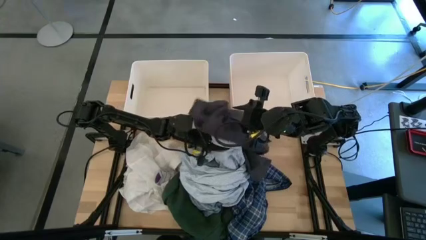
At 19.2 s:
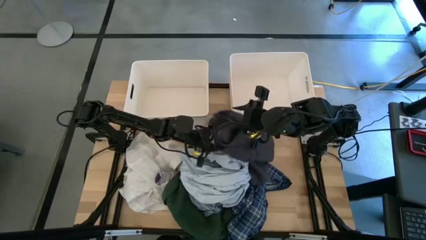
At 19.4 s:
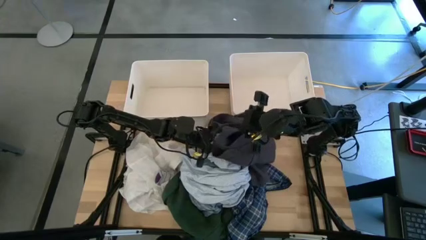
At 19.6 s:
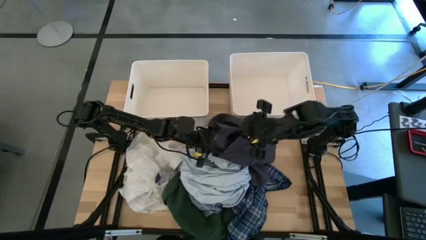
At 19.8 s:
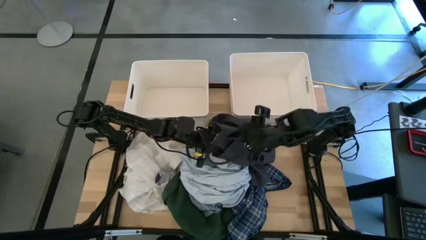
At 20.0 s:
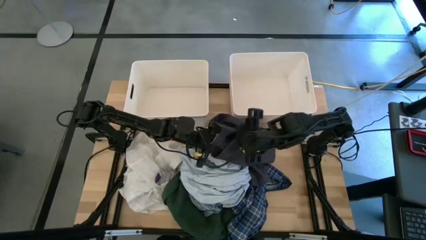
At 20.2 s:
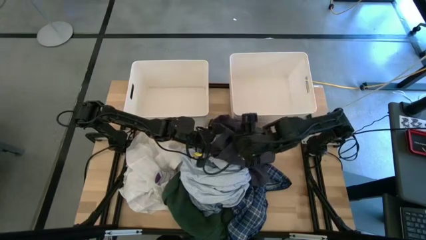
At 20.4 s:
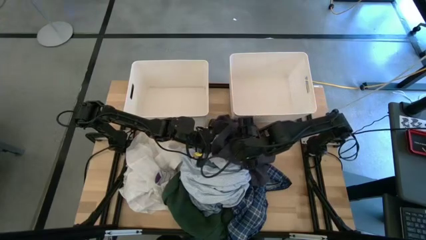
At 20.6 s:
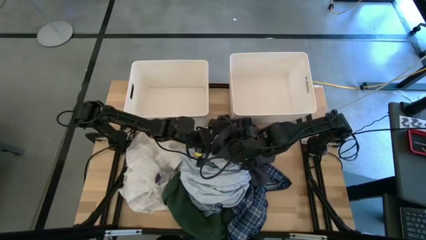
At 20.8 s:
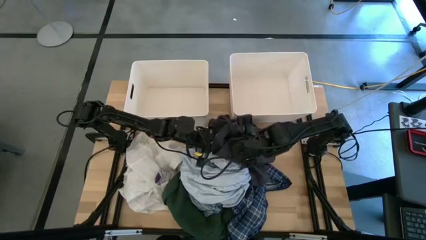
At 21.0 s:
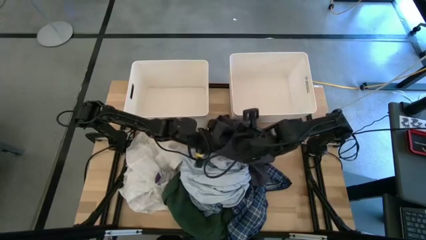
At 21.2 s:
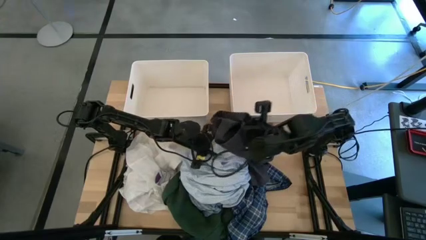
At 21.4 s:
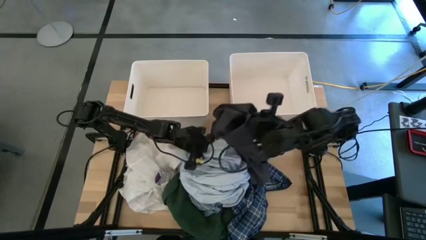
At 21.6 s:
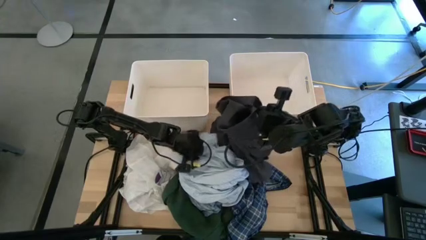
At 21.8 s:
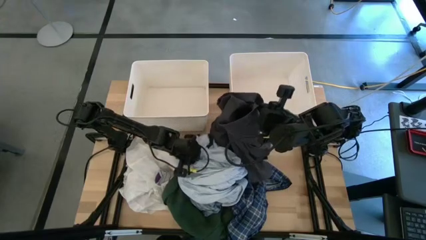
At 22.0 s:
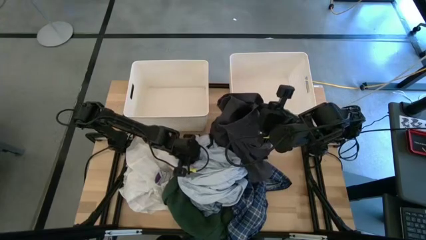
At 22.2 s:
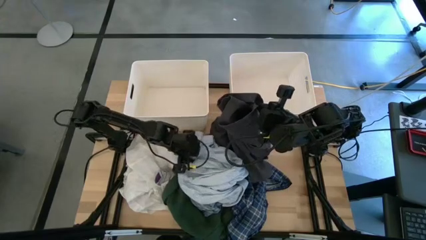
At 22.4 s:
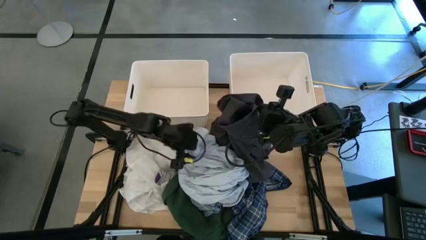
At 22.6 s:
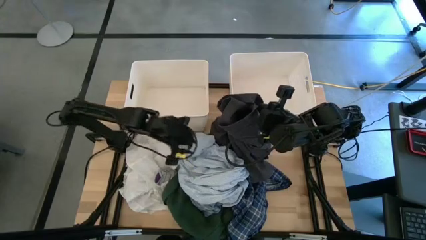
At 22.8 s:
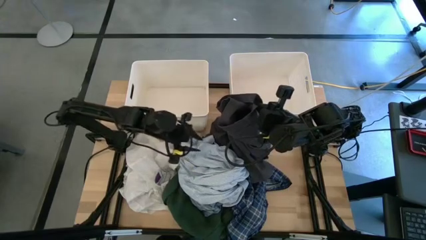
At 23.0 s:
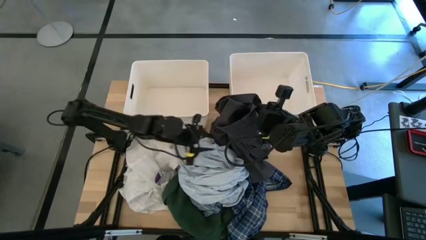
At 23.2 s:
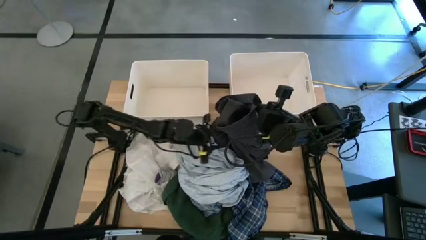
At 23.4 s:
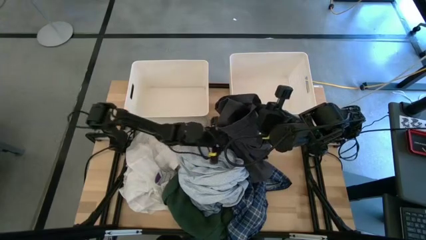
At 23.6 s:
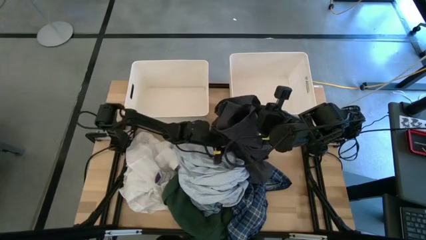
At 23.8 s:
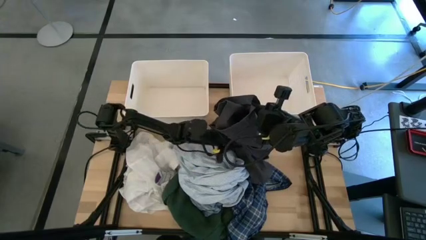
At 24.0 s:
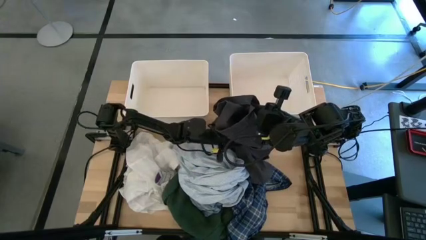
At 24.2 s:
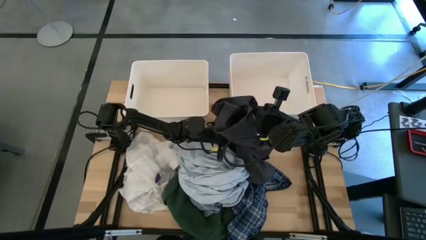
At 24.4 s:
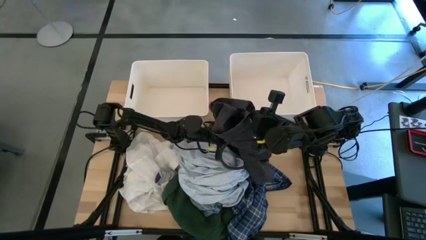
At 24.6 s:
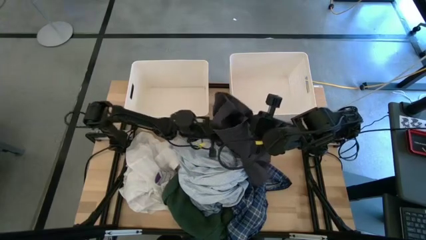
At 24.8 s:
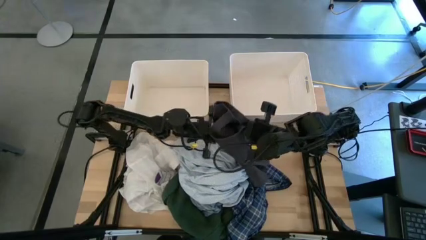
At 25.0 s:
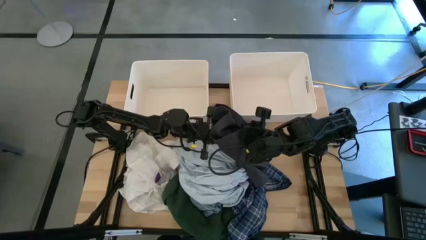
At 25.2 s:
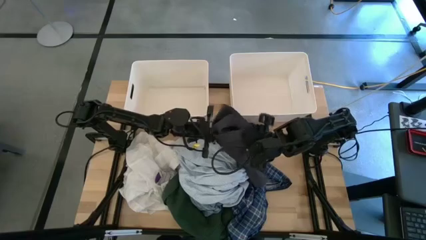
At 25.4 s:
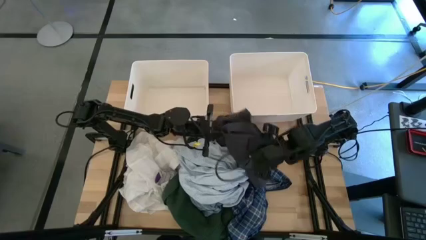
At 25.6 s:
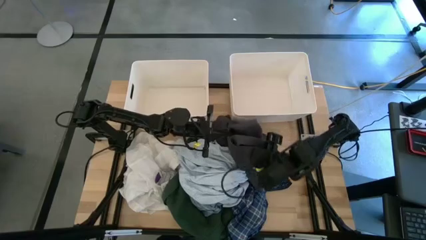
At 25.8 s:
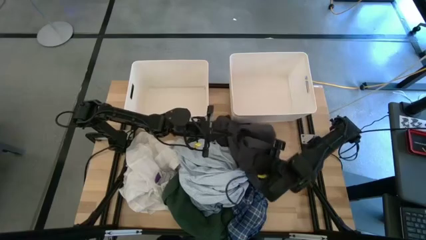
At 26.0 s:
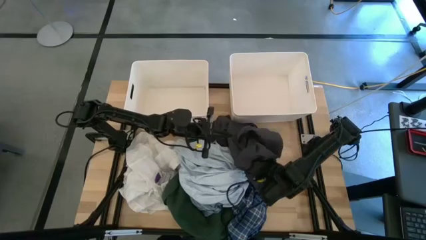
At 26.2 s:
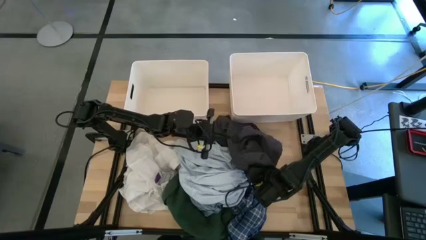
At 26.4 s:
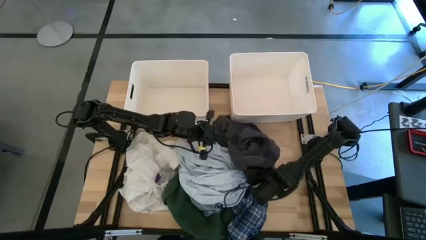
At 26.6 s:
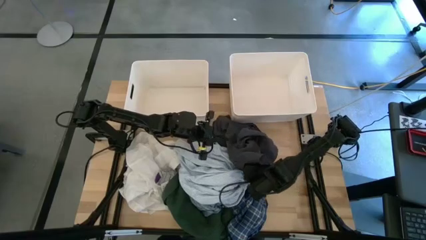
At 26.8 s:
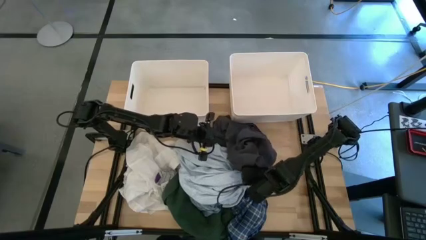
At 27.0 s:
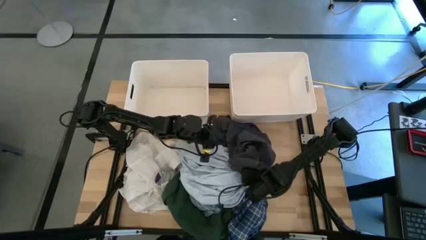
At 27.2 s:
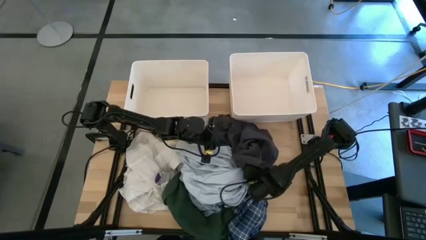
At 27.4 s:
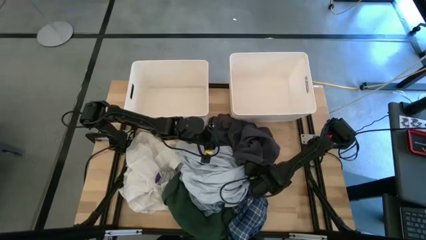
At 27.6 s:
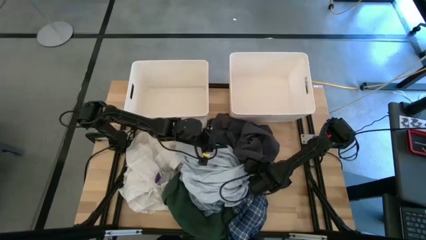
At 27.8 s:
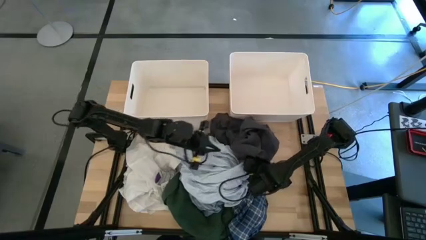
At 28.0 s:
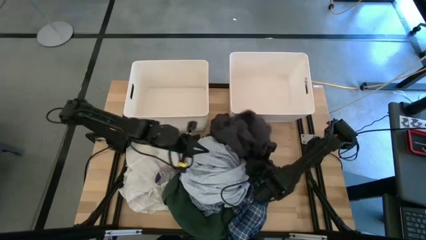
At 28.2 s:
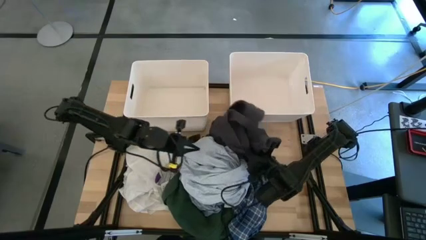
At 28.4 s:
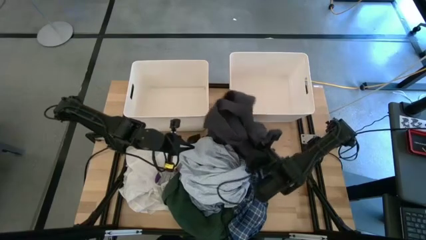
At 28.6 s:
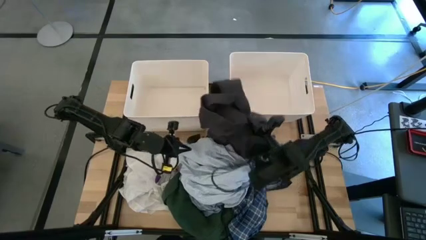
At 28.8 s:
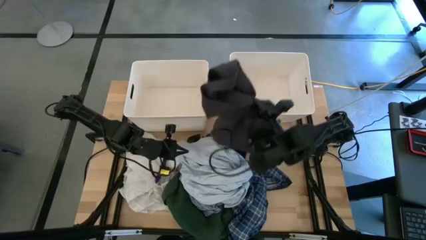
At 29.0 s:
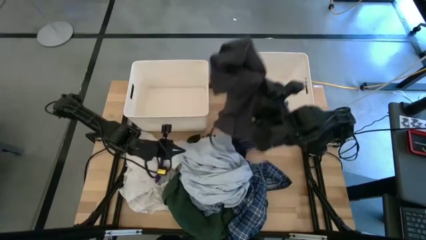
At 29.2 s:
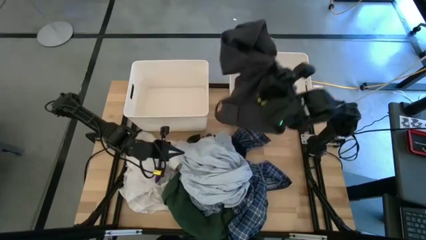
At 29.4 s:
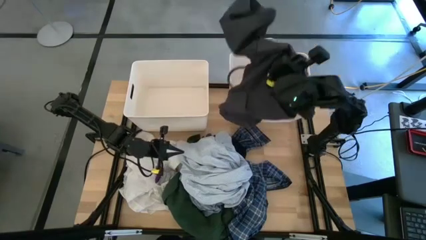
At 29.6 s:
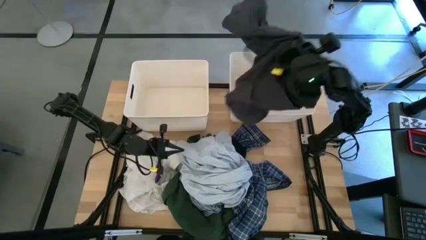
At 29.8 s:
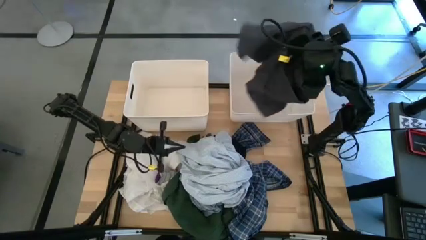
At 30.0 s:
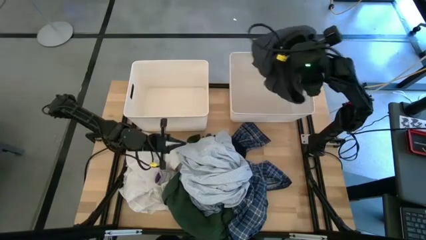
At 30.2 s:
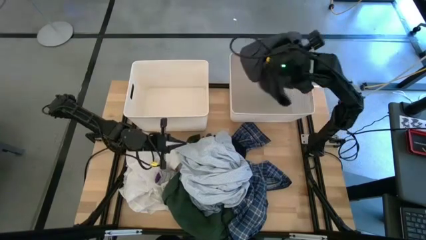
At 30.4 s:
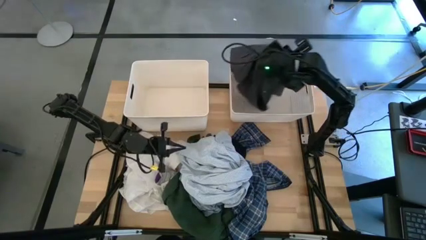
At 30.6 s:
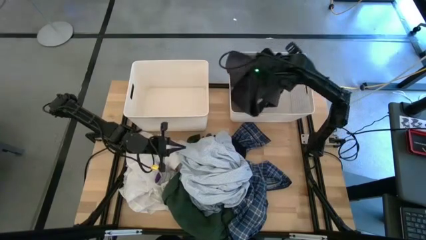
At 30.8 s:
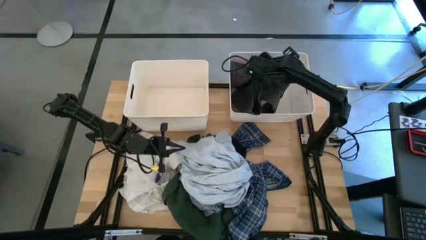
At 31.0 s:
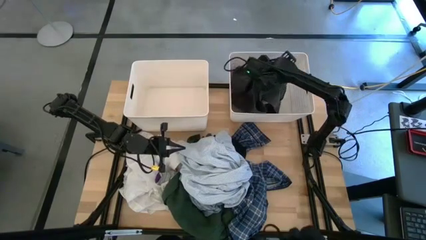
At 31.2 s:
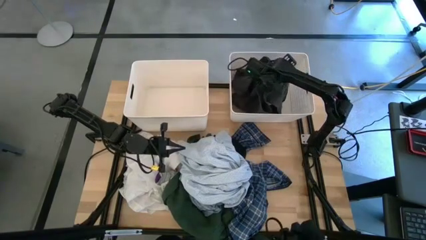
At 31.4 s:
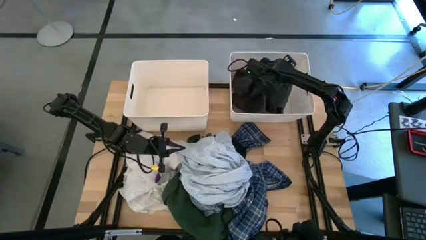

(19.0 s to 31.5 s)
Task: Sort clothes
Put the black pants into the right white bin

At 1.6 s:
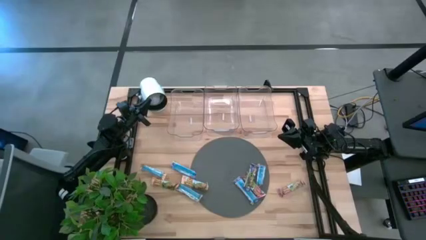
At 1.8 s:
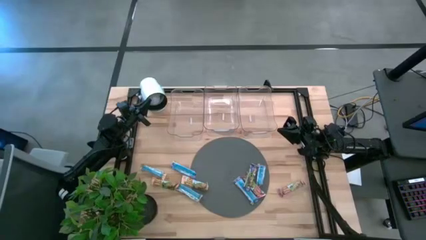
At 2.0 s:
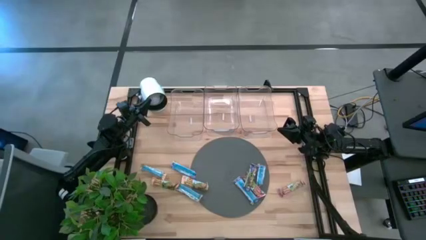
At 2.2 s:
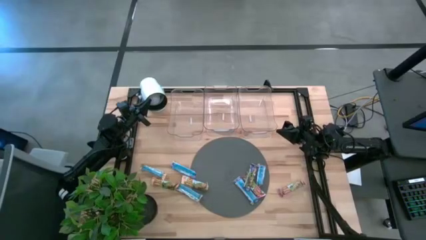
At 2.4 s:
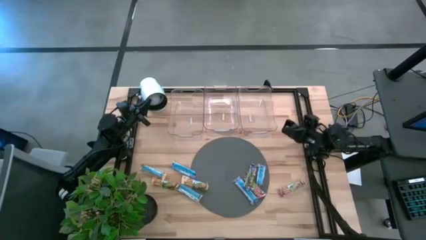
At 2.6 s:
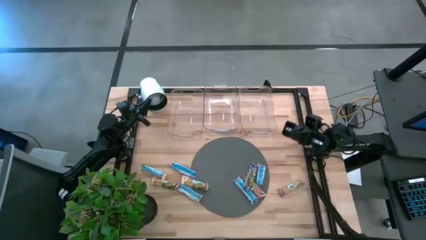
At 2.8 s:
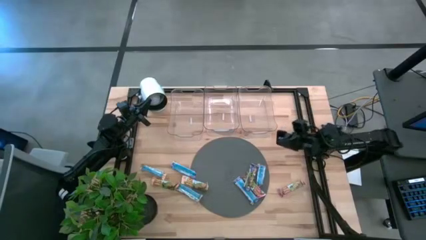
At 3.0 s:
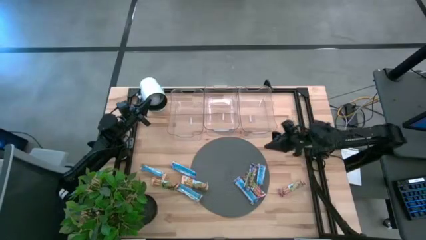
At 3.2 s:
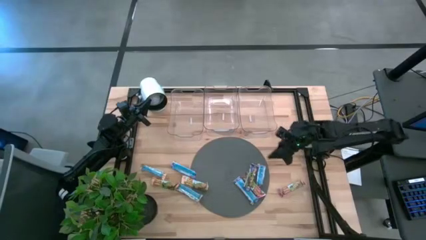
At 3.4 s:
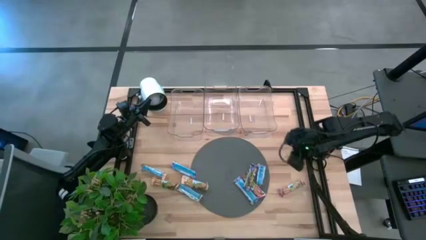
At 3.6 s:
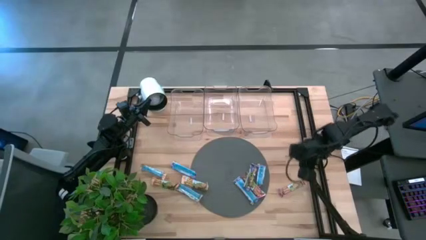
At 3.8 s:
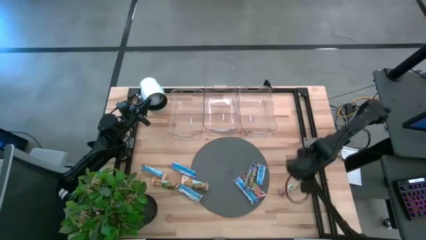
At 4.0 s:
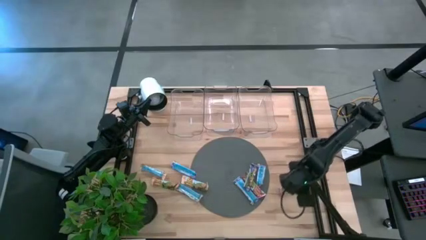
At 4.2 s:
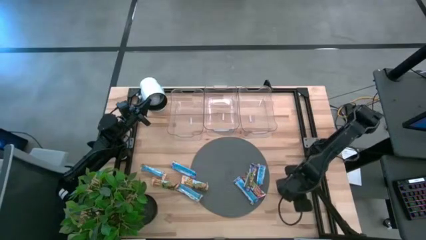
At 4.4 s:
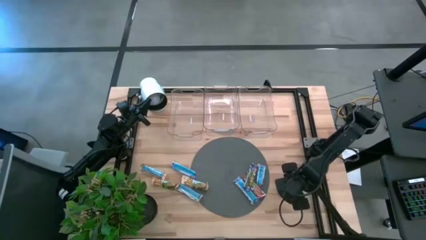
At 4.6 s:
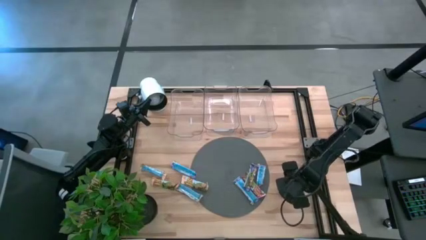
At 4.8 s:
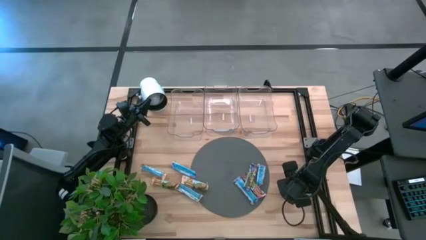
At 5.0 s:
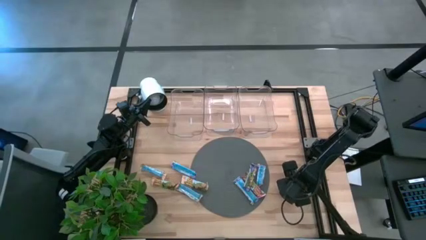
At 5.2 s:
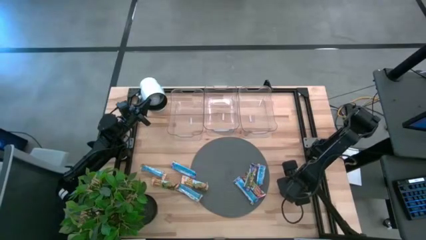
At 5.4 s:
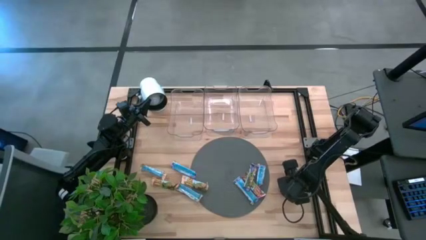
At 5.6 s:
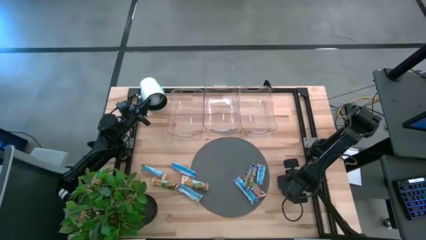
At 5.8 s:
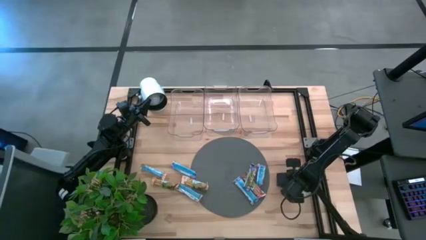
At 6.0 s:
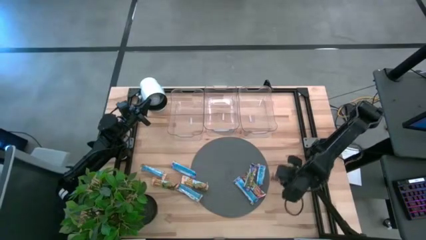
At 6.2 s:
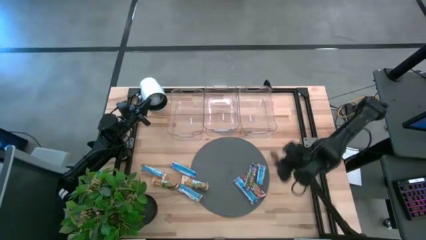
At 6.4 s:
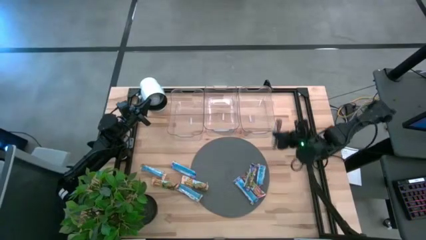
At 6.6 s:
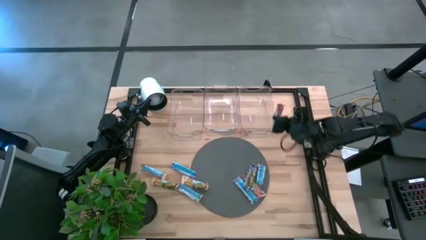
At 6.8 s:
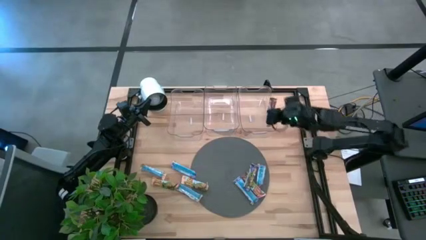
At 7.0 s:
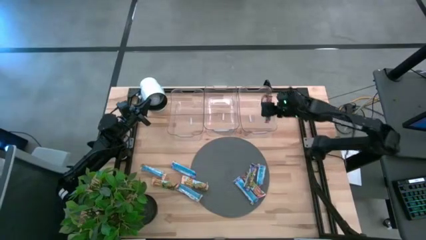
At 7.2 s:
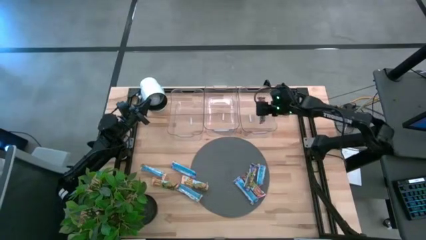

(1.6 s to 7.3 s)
Task: Pick and place Granola Bars by type
Put the right red granola bar into the right bin
